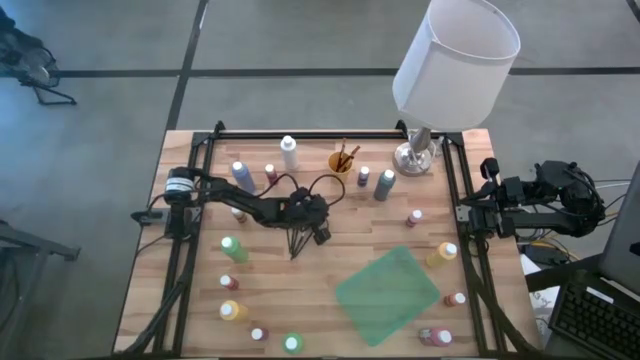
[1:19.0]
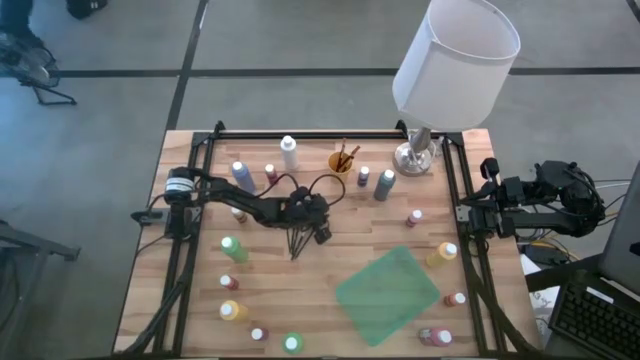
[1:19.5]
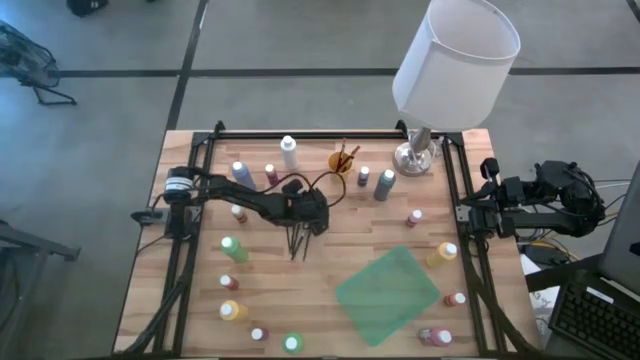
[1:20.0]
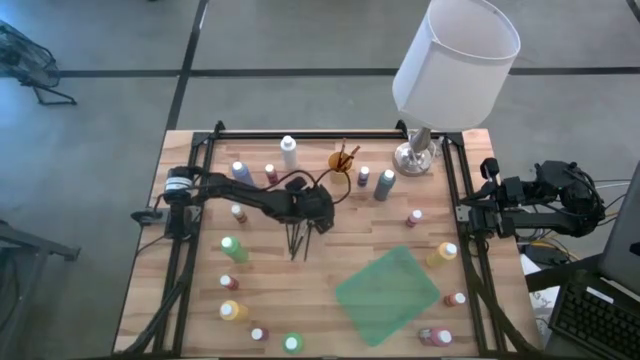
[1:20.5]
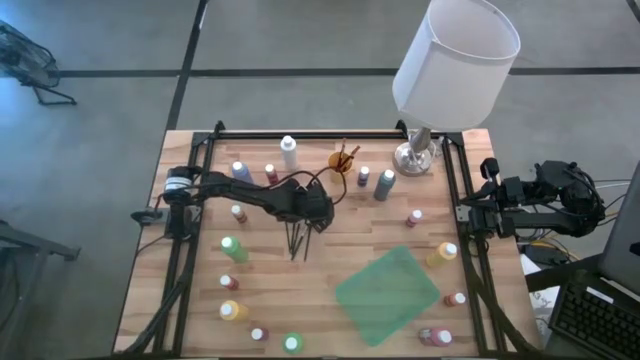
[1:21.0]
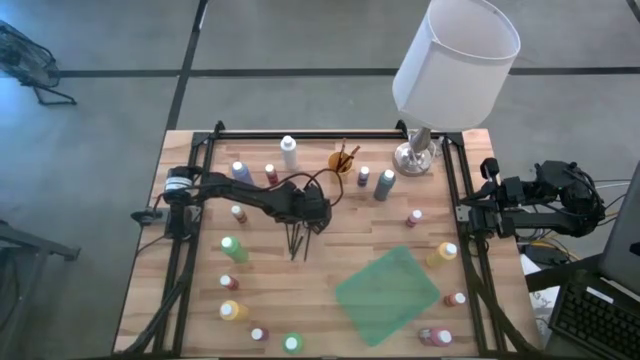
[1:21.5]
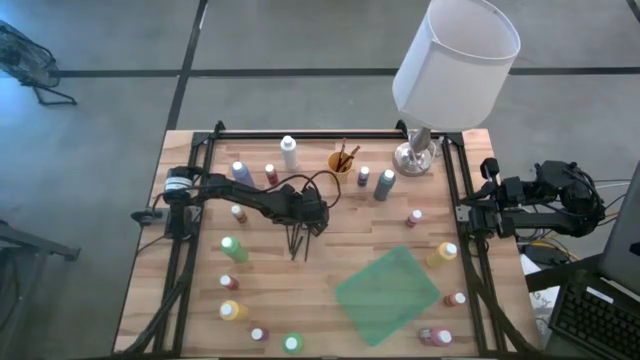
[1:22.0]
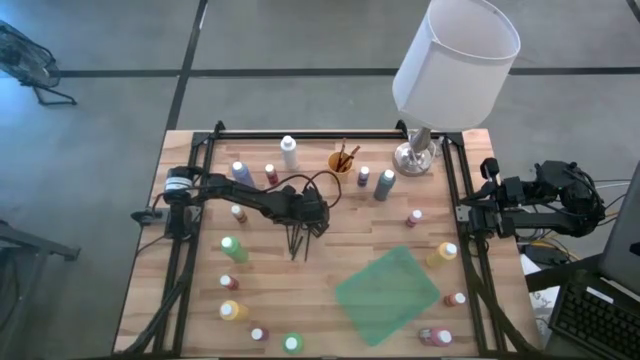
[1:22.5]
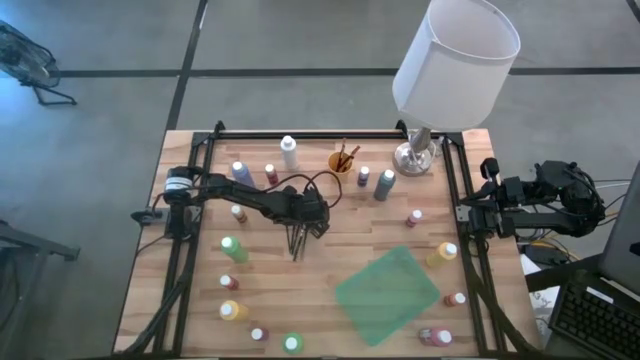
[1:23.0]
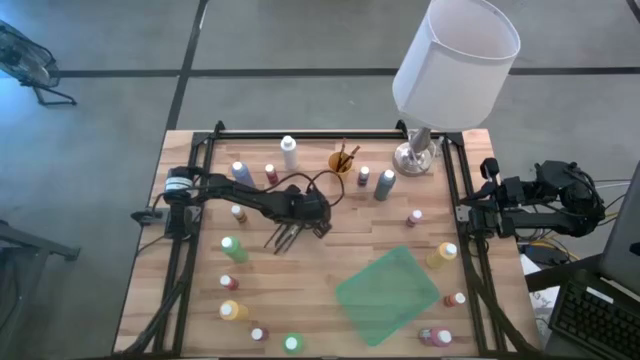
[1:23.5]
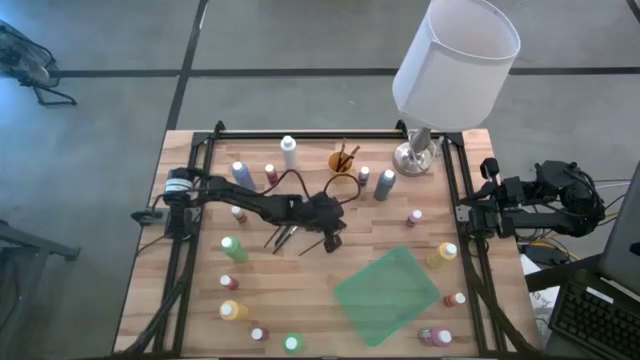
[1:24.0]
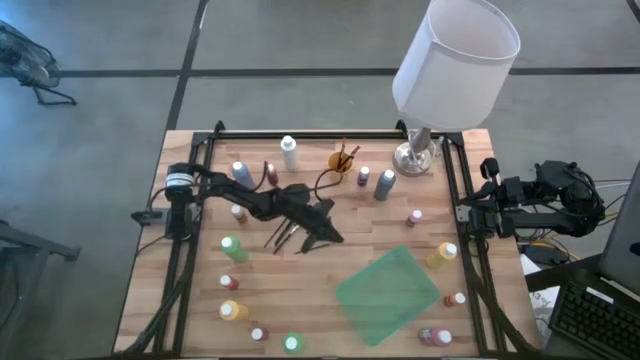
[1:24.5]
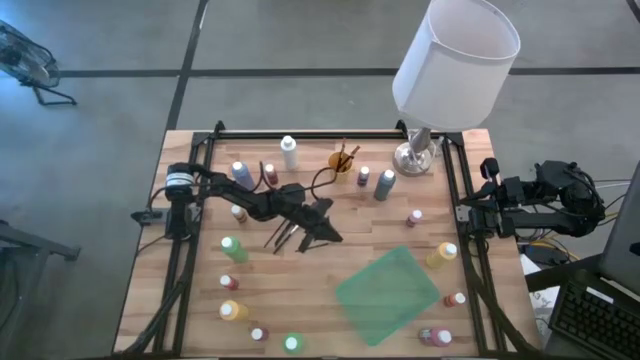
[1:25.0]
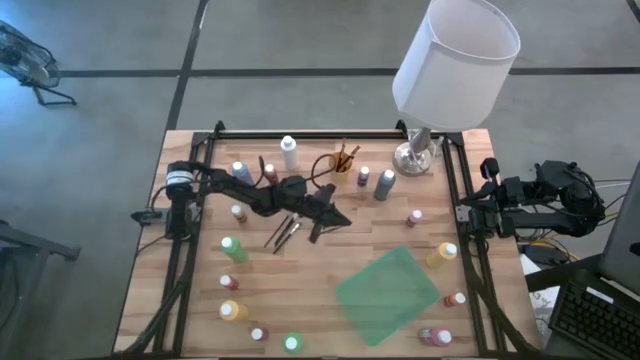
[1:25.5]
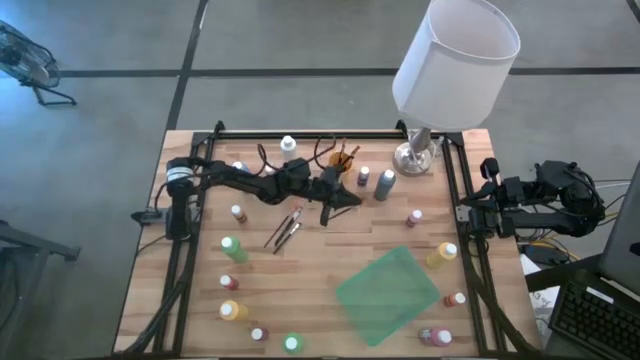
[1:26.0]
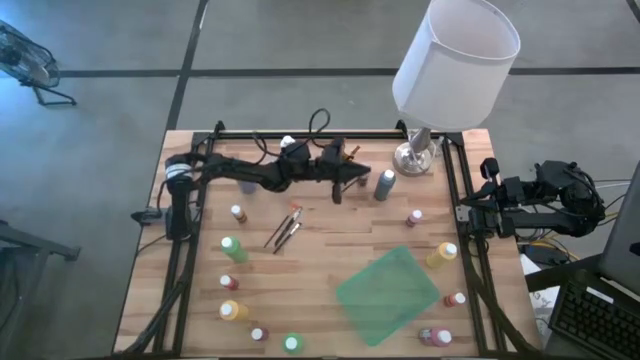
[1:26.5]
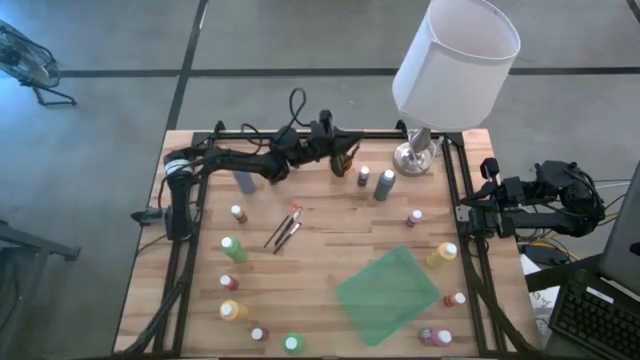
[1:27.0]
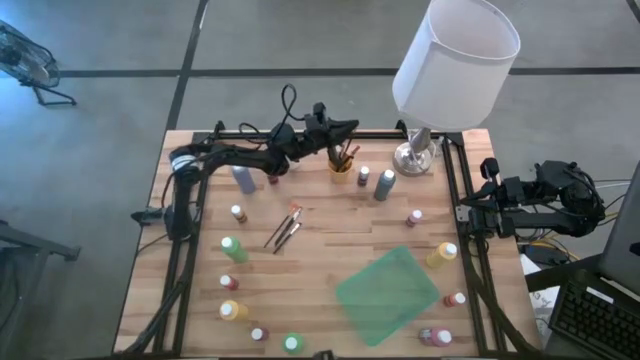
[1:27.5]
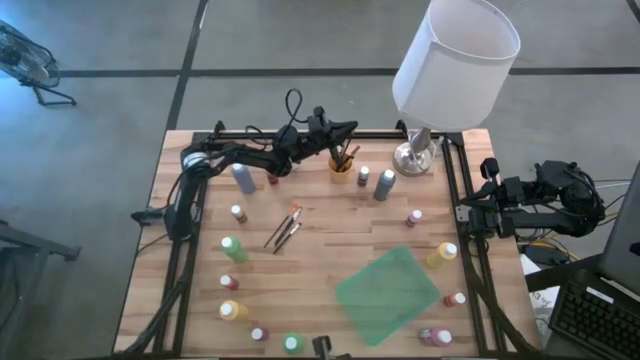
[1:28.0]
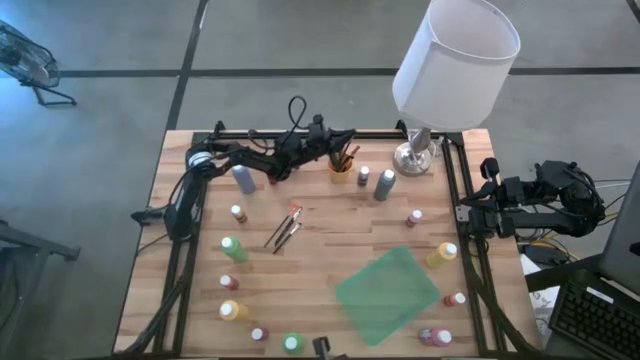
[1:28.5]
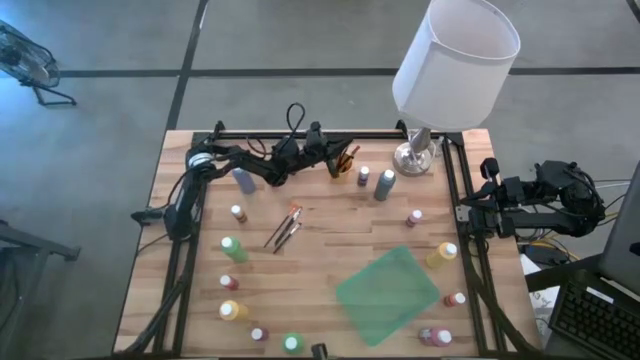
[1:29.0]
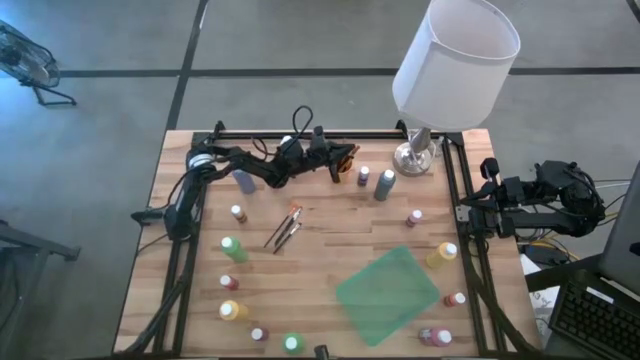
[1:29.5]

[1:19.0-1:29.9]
Task: Pick & Place Paint Supplies
Put the gold paintbrush into the yellow cup

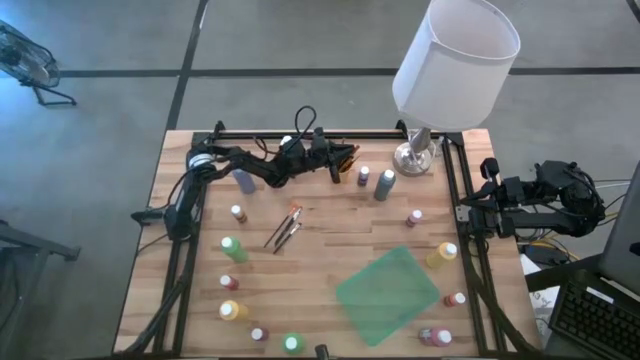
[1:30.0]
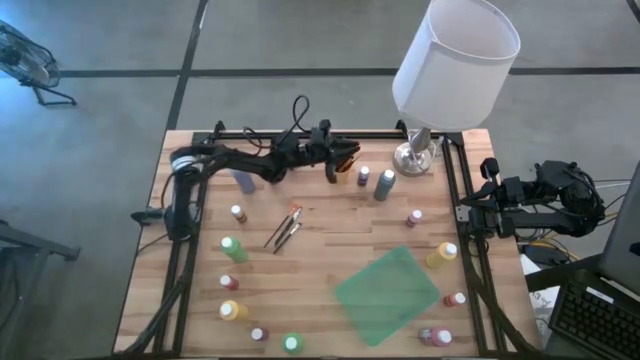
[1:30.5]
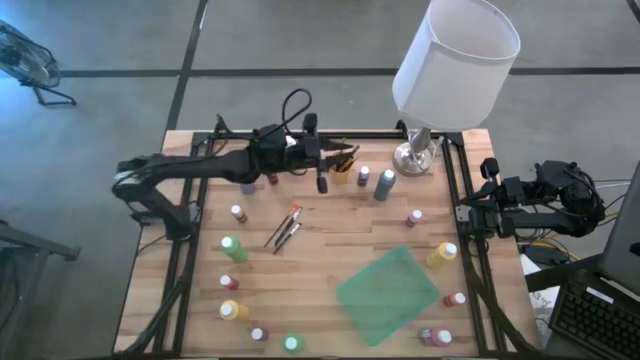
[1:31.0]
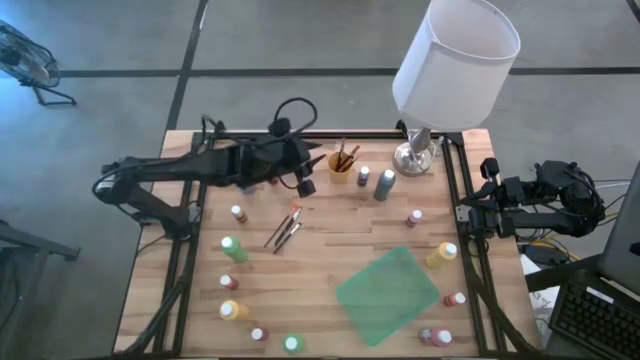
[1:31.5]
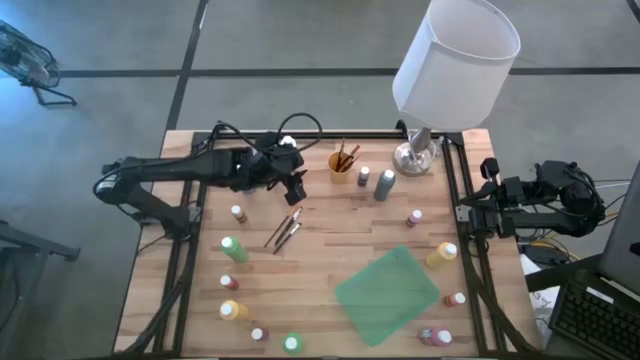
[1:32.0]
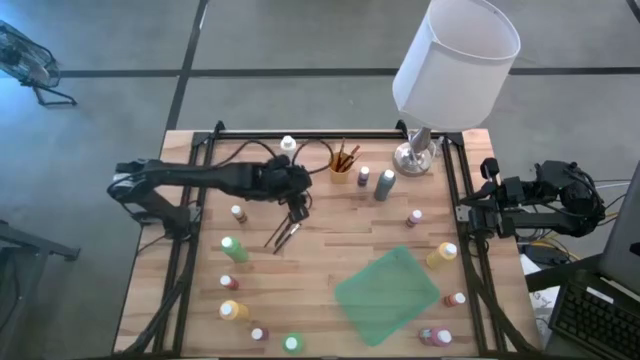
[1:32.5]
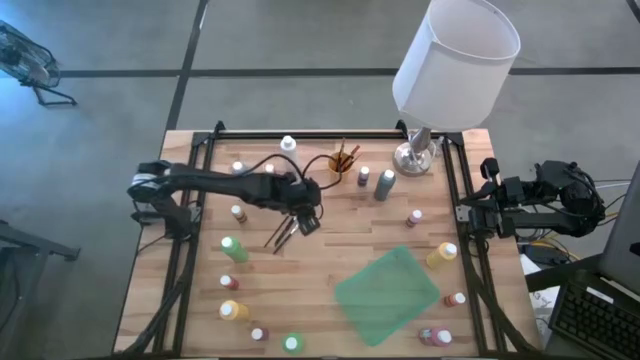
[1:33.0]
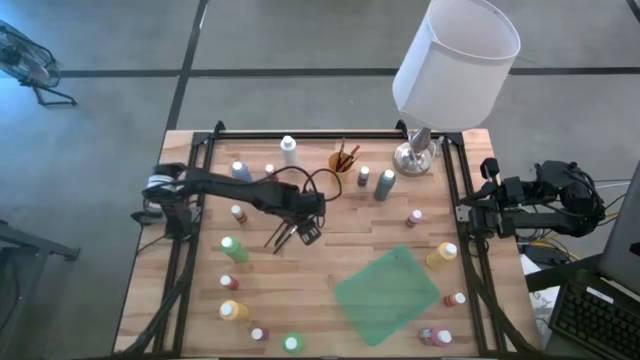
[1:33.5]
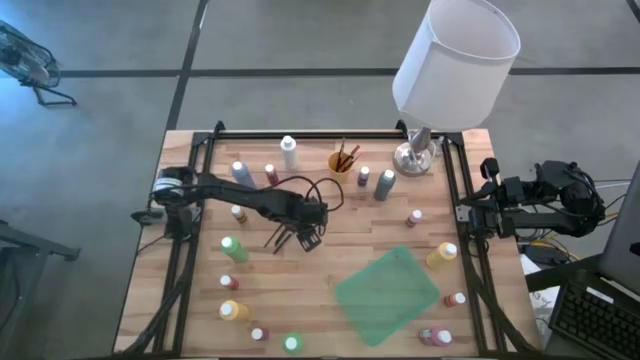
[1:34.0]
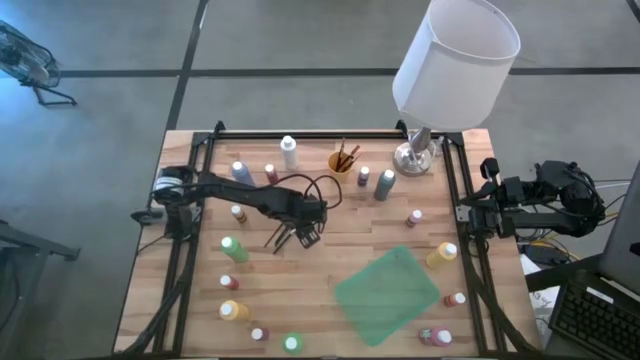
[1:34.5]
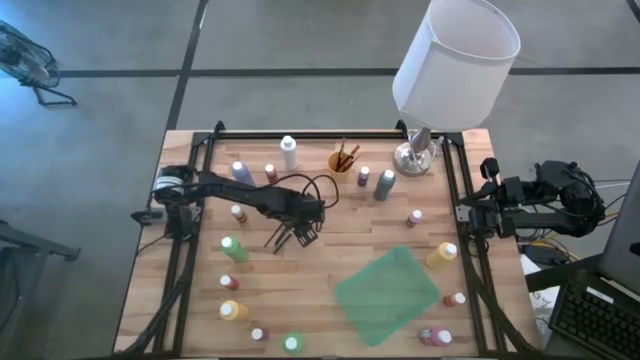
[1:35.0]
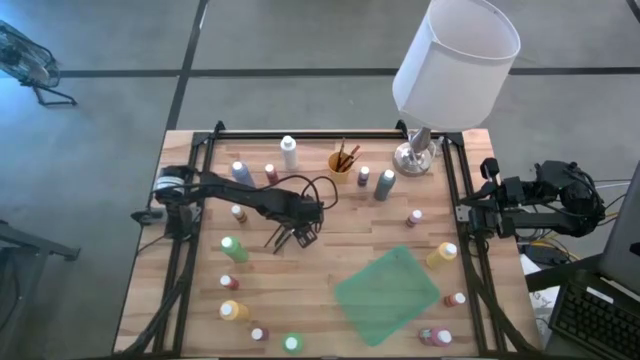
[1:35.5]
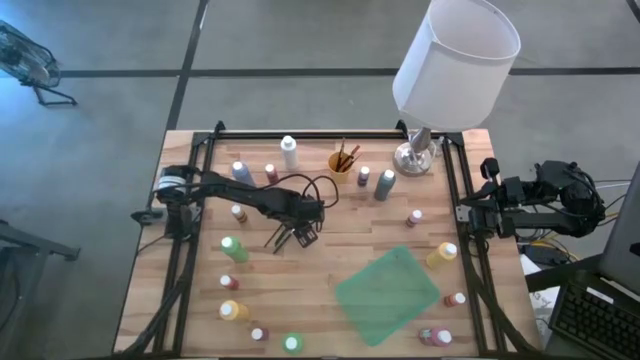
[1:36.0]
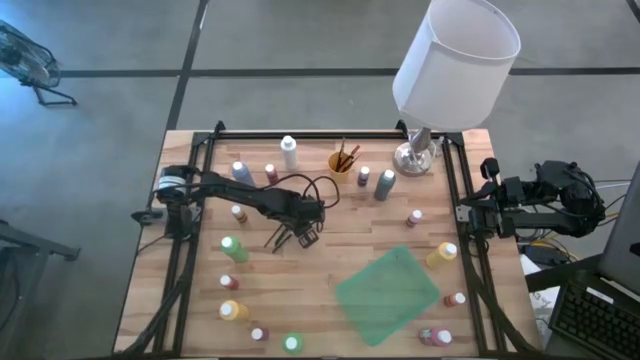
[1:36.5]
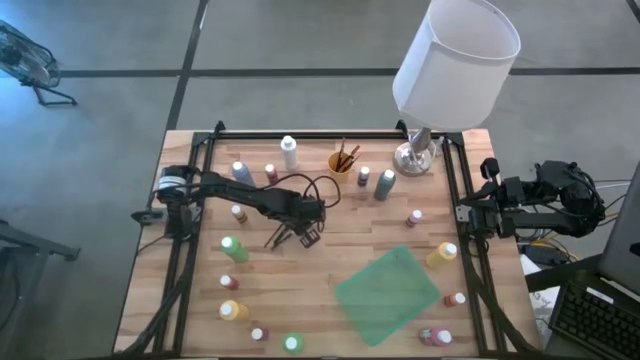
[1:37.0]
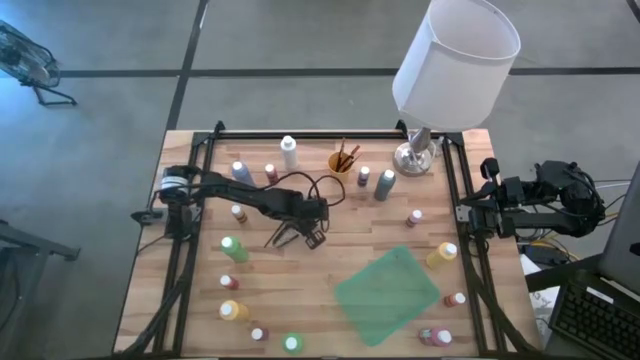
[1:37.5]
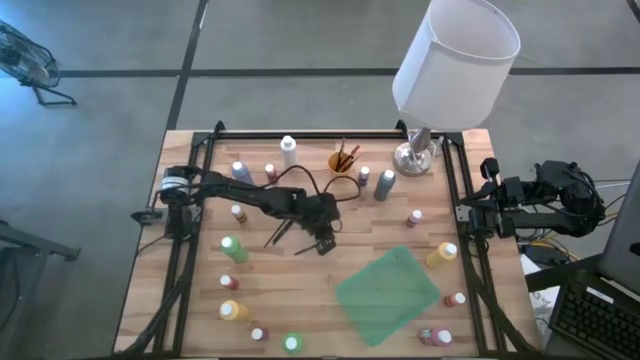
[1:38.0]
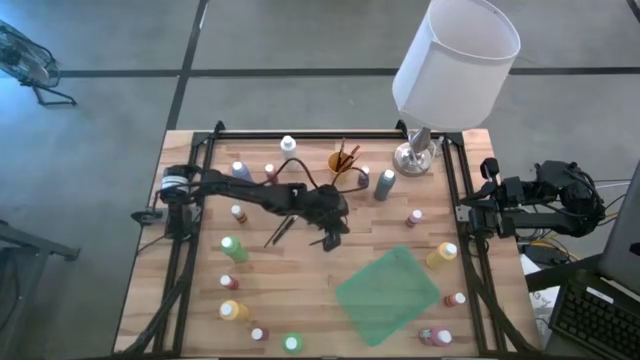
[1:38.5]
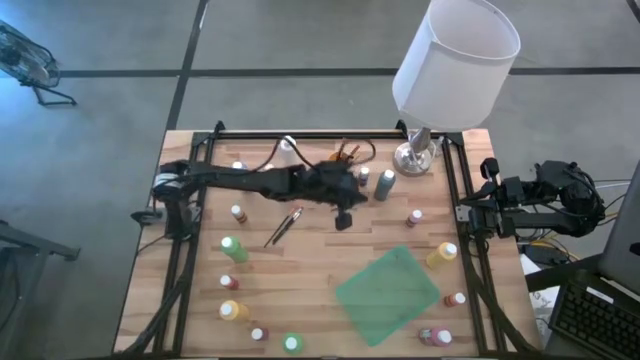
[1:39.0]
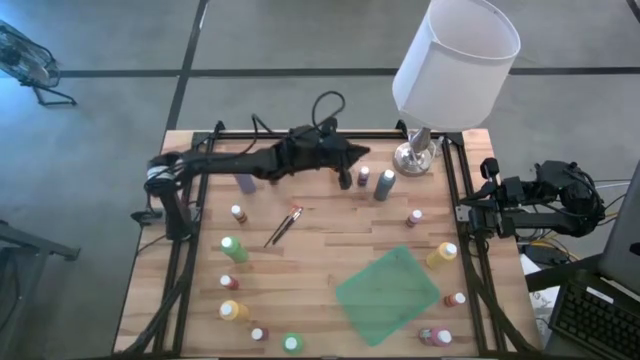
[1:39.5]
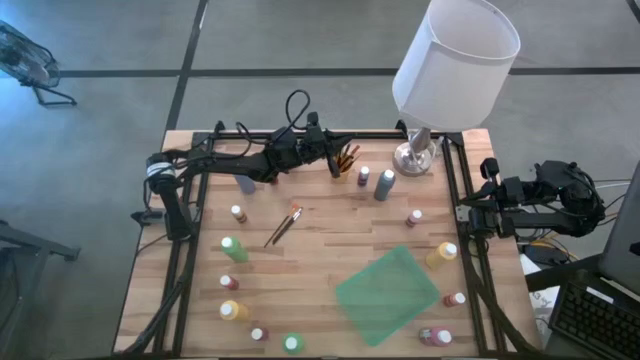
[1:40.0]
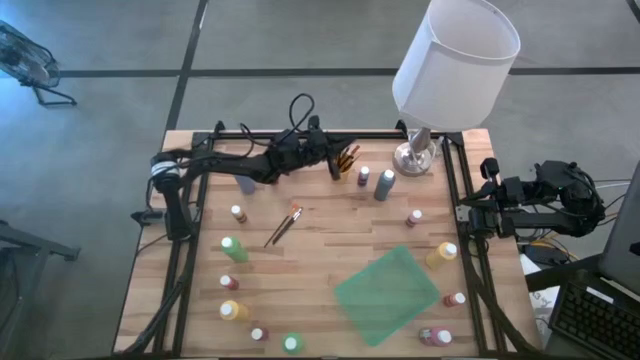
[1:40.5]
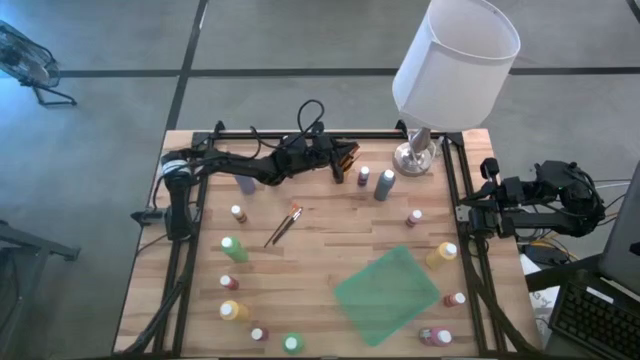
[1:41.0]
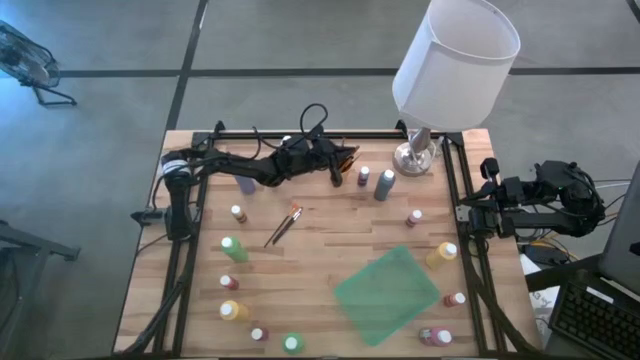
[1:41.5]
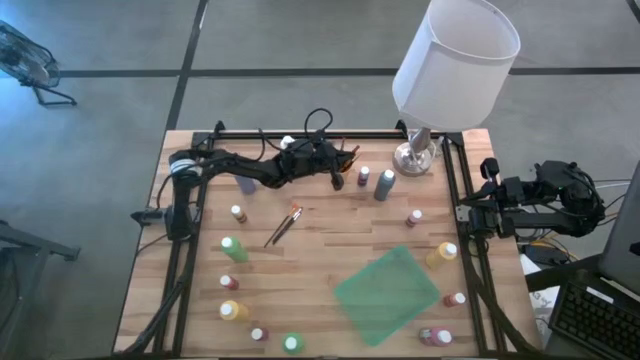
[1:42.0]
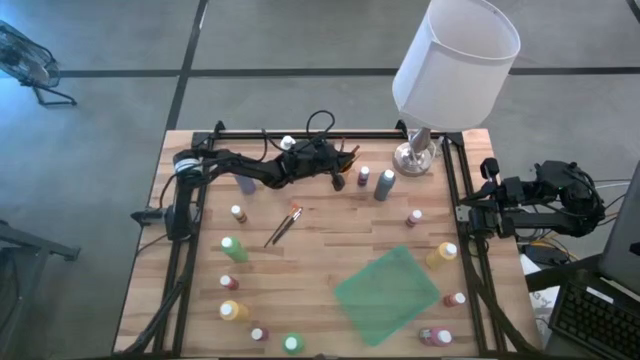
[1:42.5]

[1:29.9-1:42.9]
Put the silver paintbrush into the yellow cup
